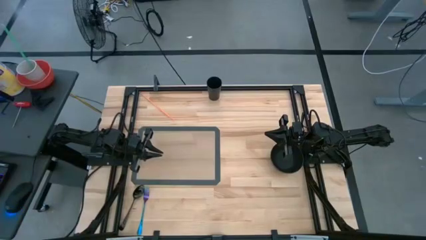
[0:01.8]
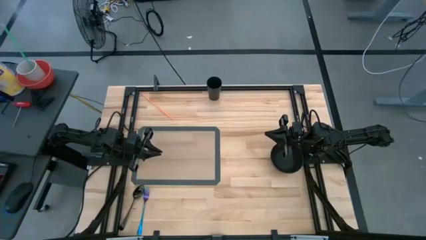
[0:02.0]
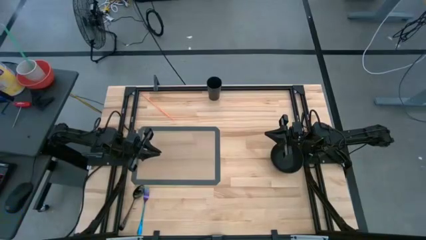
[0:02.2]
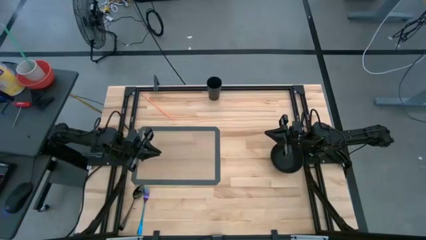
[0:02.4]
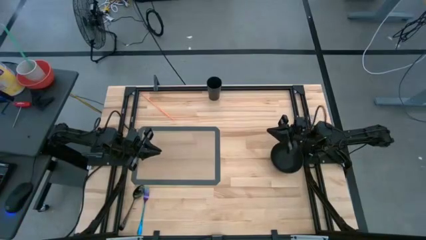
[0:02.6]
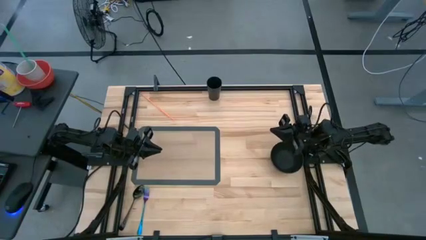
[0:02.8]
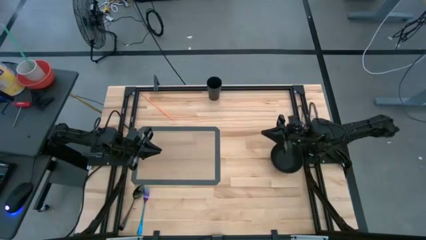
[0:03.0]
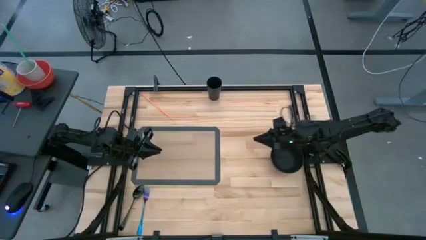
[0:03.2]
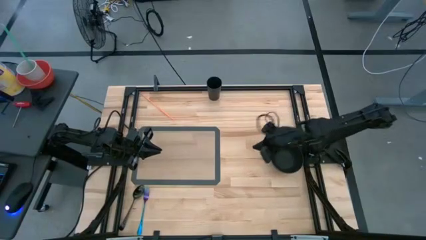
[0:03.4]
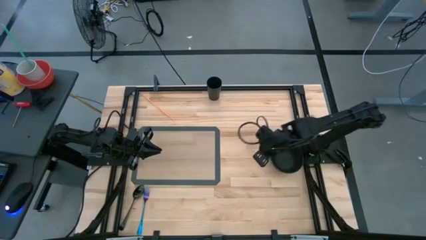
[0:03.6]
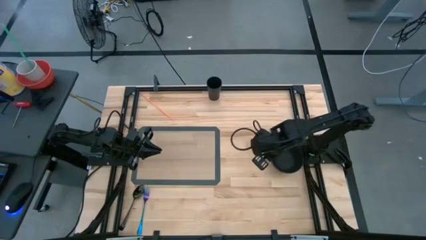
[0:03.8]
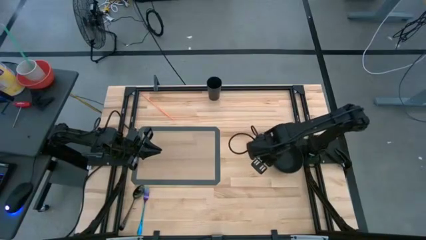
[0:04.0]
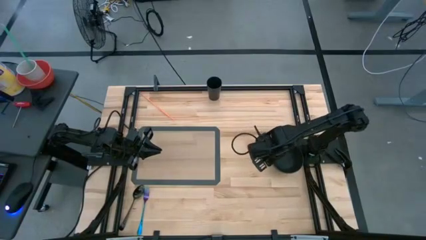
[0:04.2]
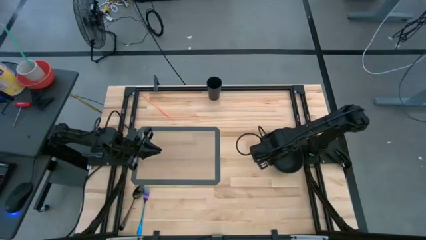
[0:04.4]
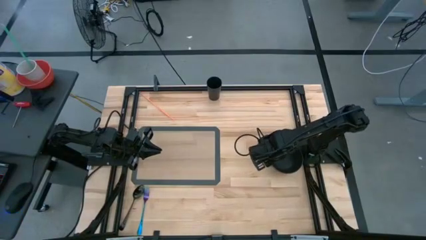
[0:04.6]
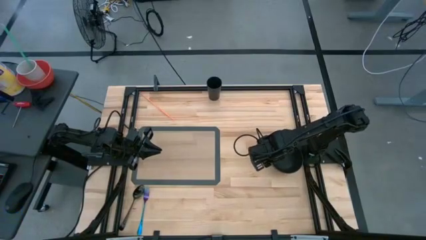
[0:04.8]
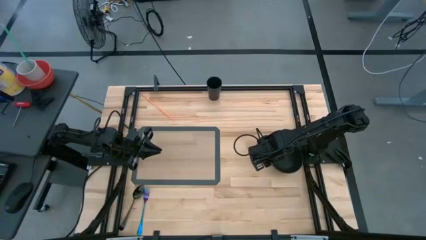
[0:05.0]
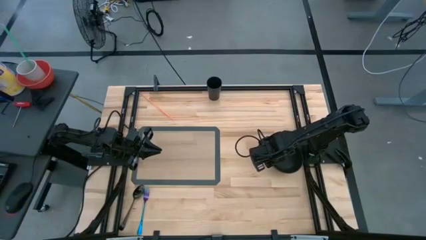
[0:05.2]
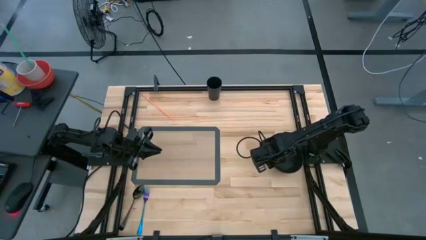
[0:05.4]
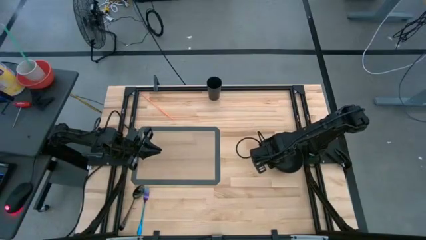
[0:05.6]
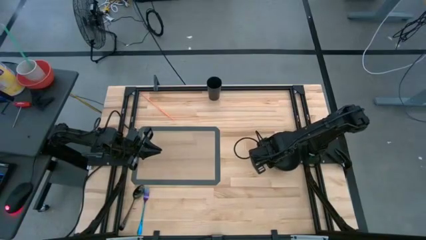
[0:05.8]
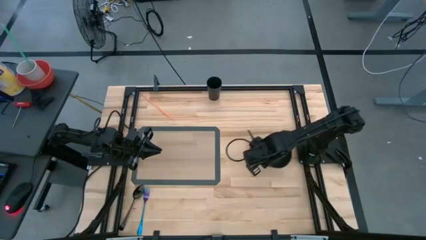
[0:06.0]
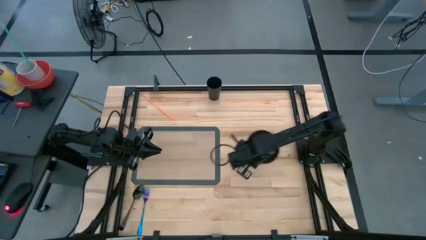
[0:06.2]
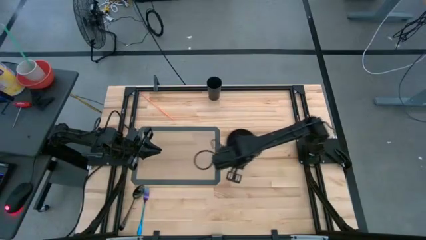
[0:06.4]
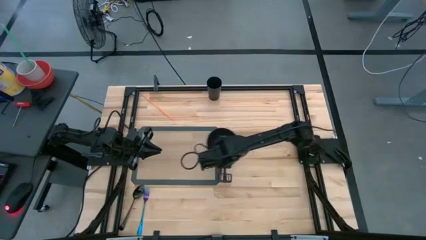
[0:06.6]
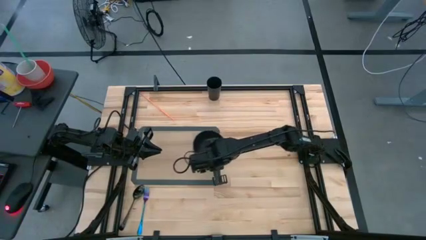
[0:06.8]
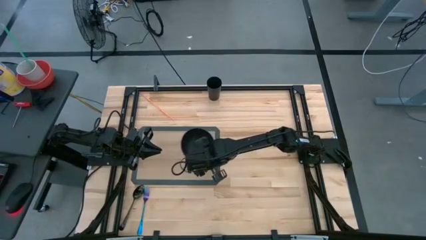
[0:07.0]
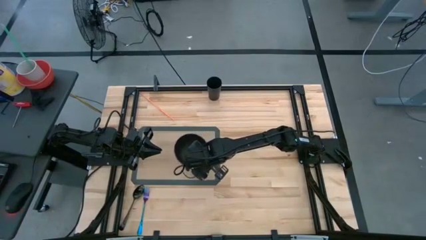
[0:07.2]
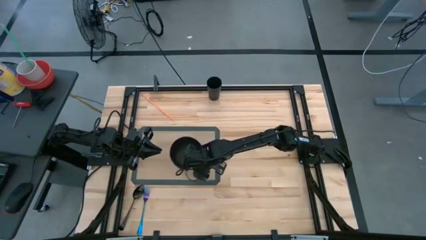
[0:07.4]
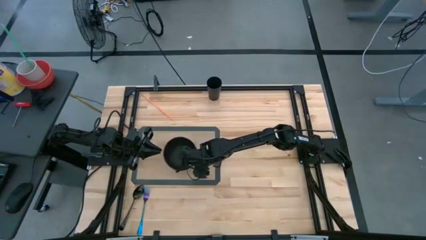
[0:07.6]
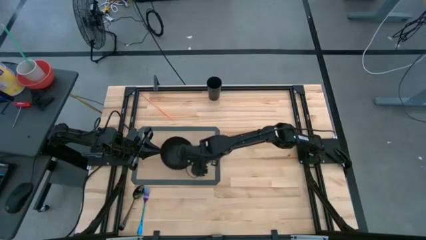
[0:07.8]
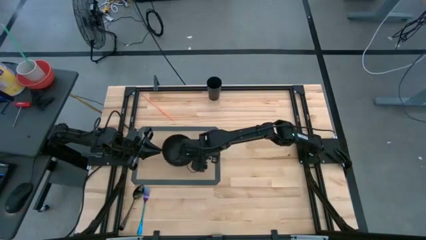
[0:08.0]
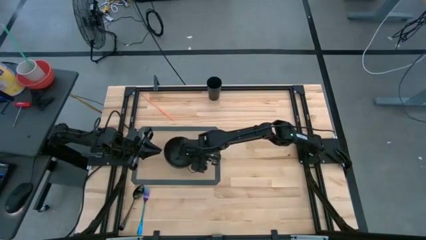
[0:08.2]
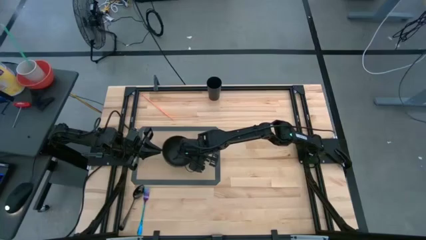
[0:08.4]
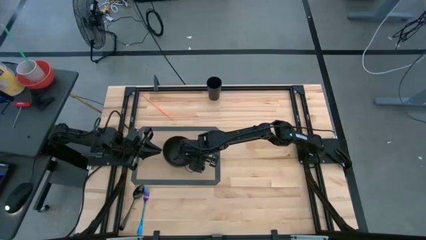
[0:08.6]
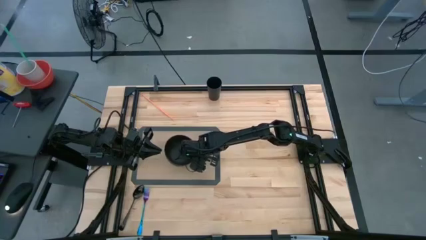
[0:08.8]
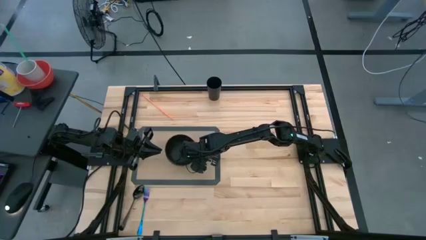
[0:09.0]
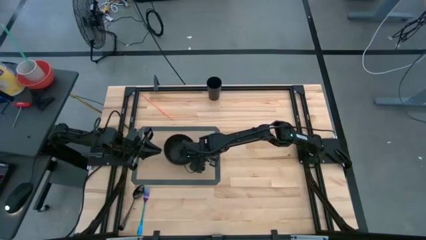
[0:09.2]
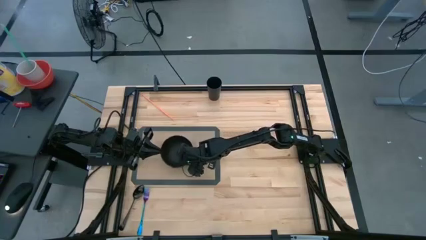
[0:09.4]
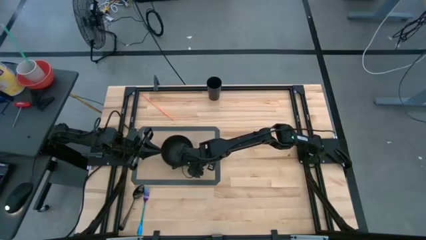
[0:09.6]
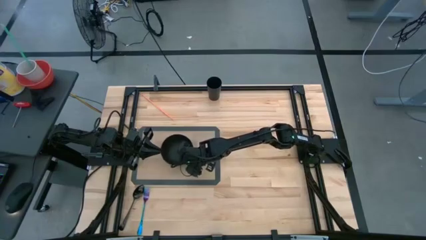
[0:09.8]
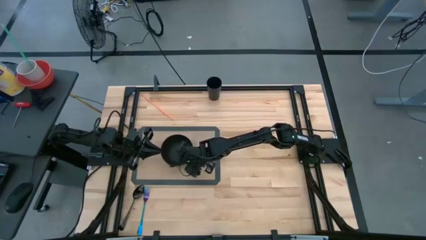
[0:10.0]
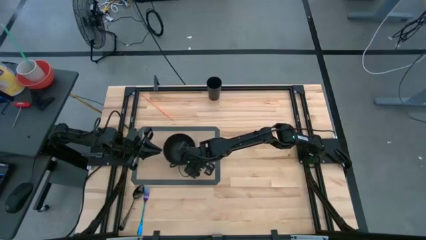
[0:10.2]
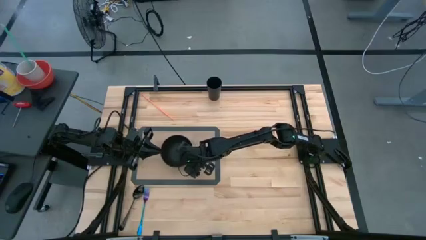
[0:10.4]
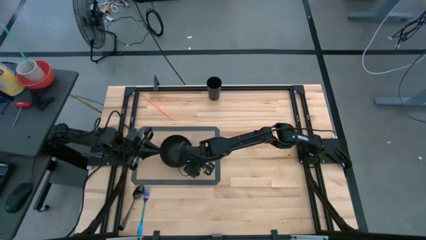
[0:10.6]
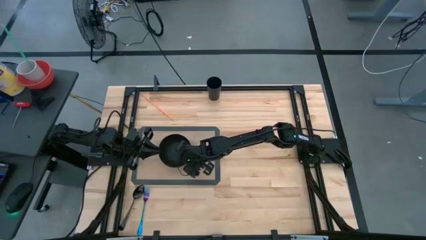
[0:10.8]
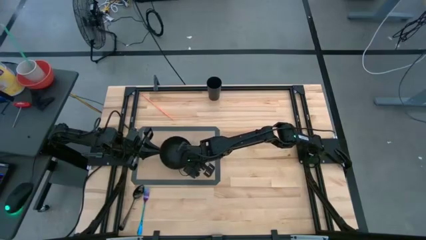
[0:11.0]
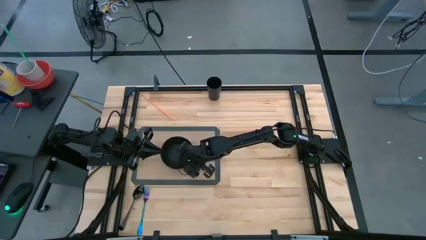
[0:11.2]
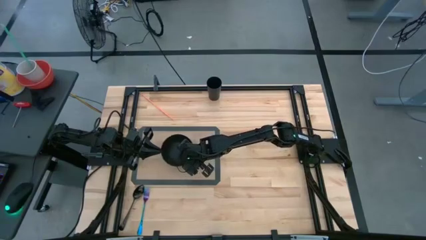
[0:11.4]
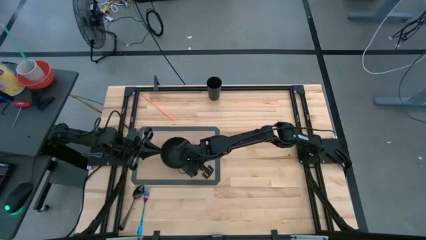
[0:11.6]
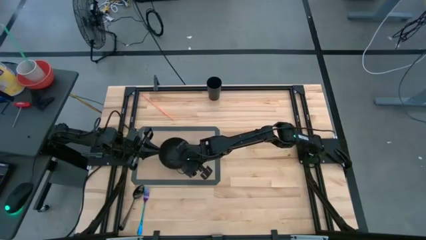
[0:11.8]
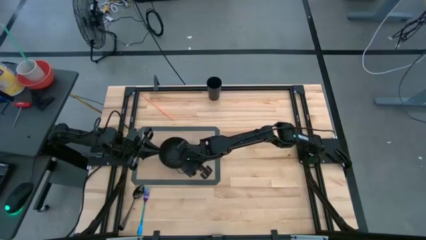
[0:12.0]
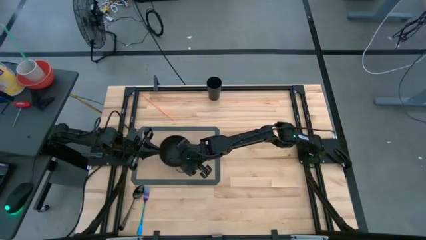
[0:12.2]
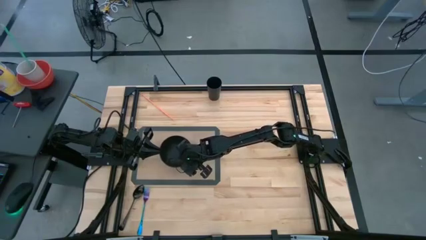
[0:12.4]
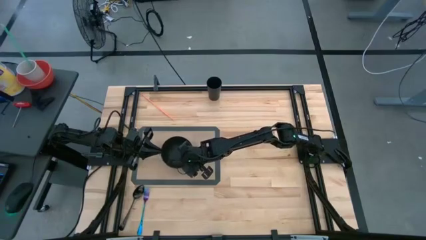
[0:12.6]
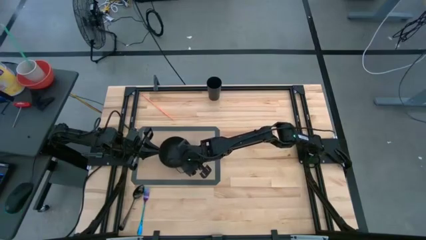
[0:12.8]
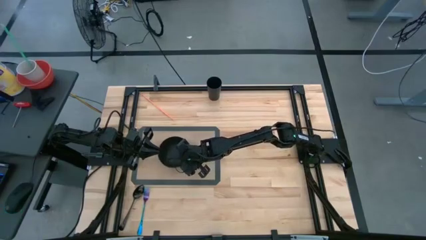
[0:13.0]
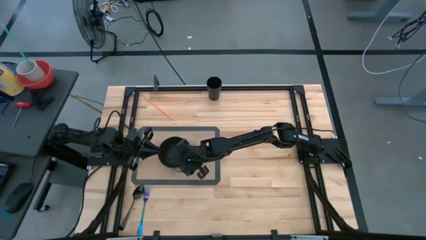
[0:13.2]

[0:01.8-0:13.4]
Task: Pick & Place Utensil
Put the black bowl on the transparent table mat
